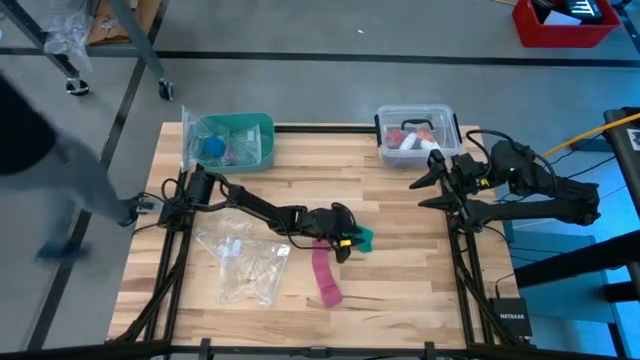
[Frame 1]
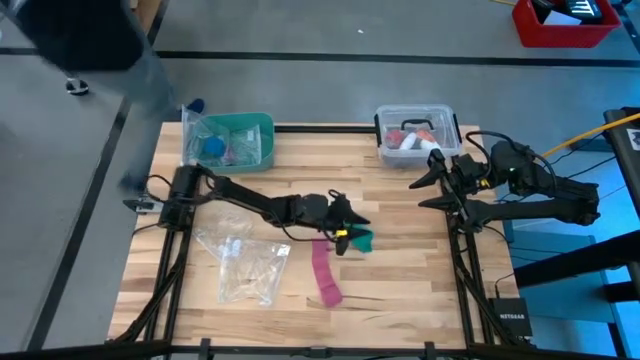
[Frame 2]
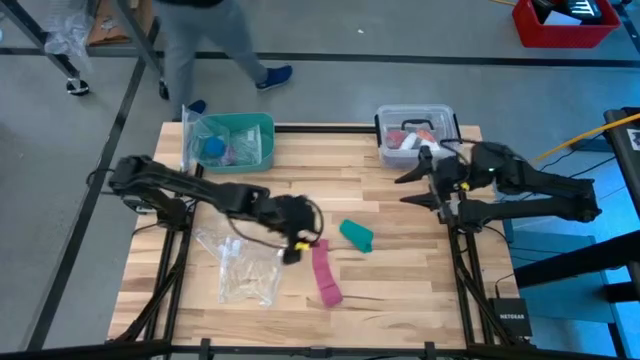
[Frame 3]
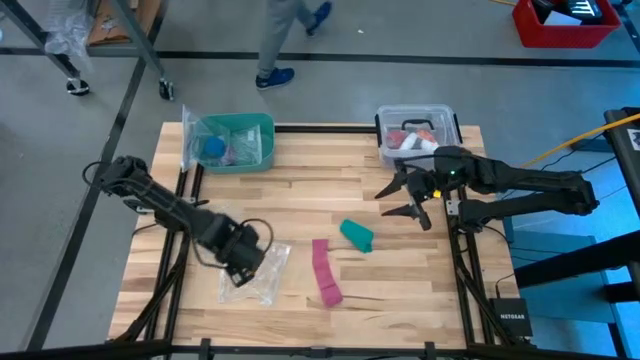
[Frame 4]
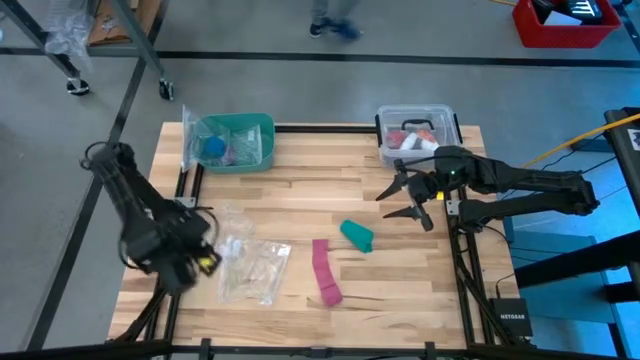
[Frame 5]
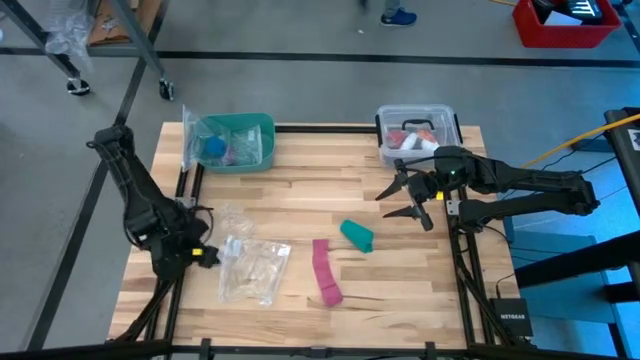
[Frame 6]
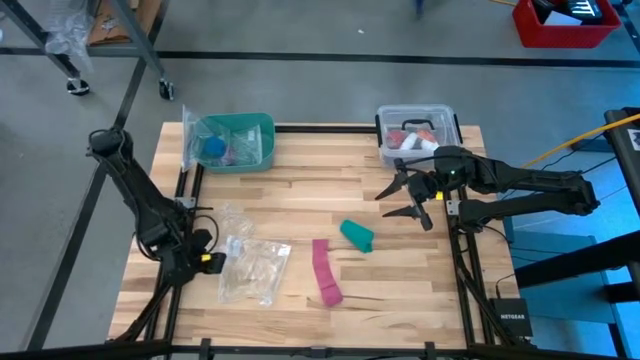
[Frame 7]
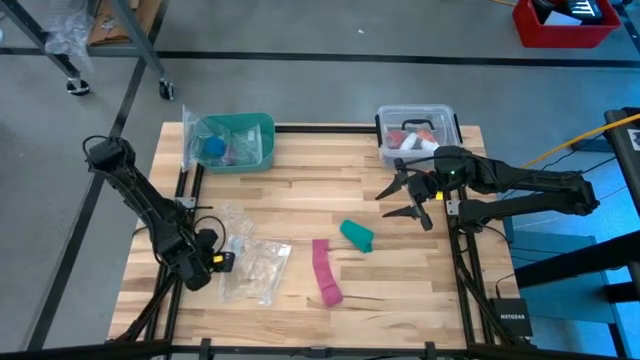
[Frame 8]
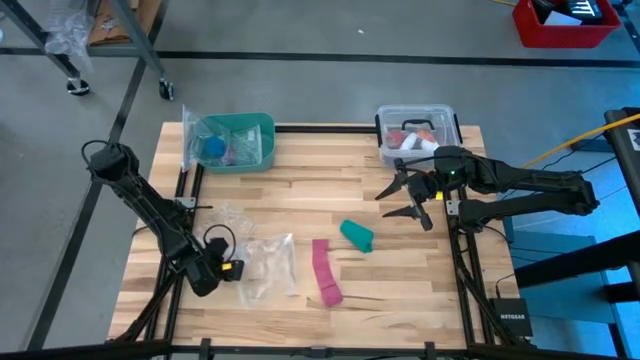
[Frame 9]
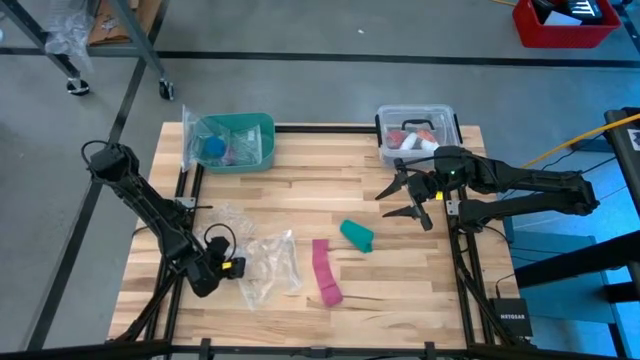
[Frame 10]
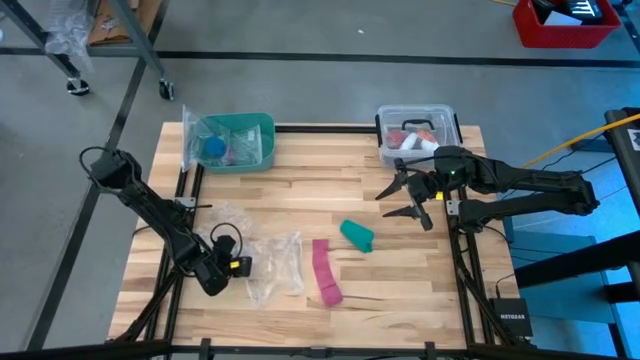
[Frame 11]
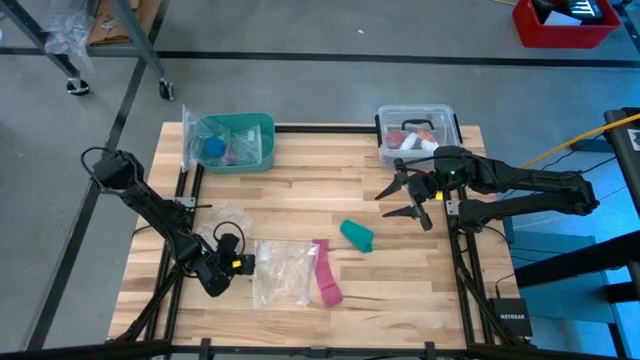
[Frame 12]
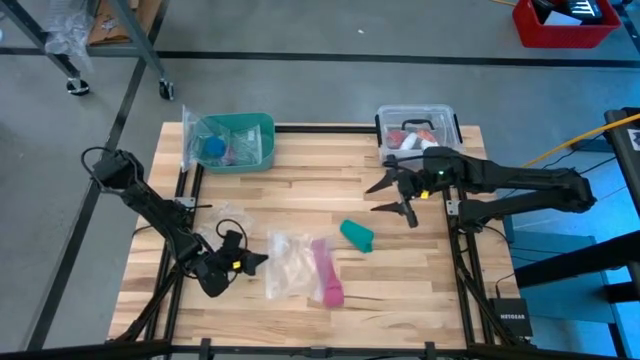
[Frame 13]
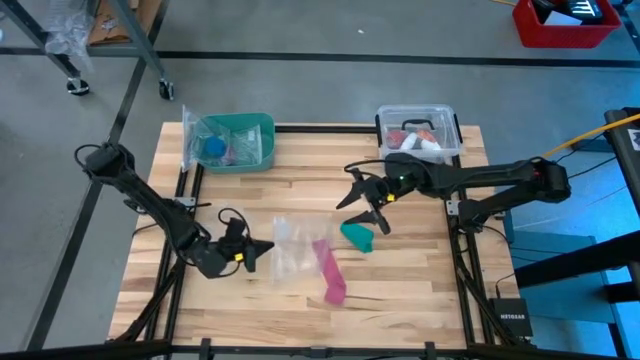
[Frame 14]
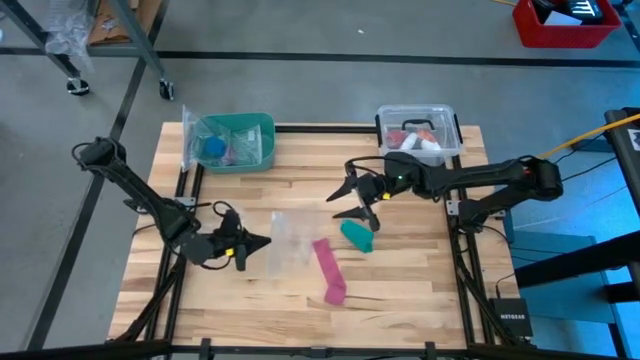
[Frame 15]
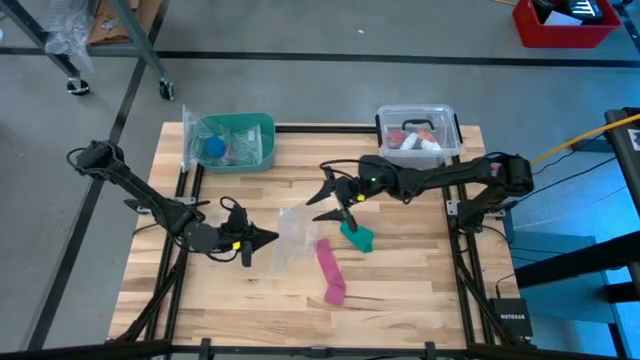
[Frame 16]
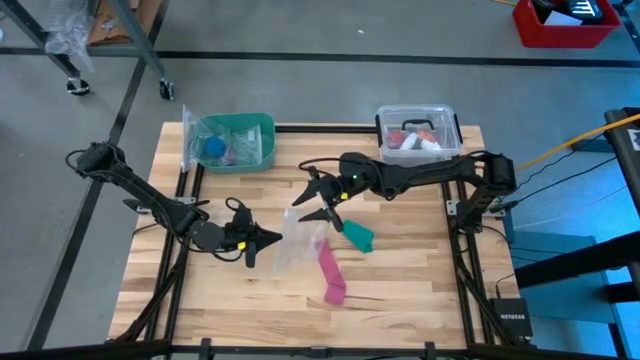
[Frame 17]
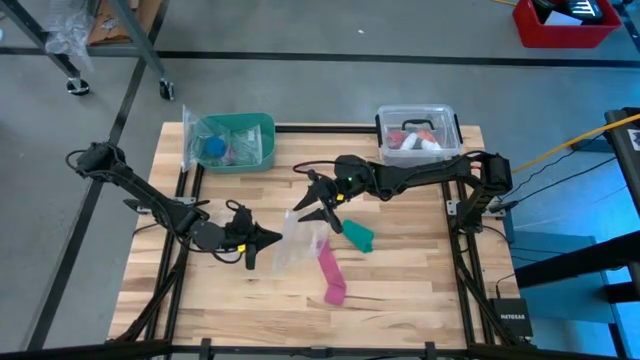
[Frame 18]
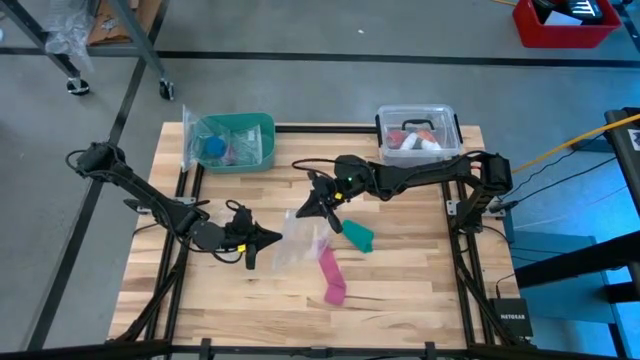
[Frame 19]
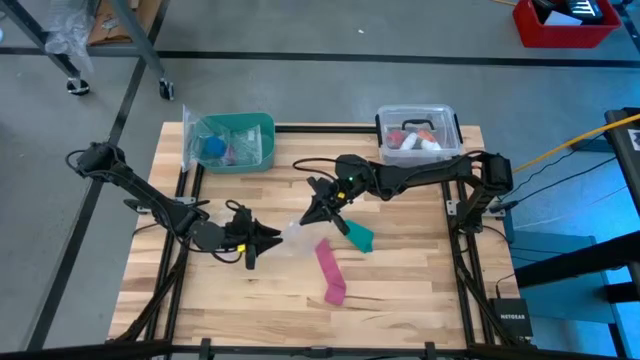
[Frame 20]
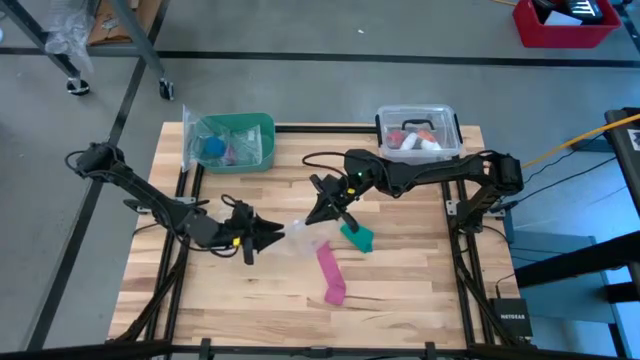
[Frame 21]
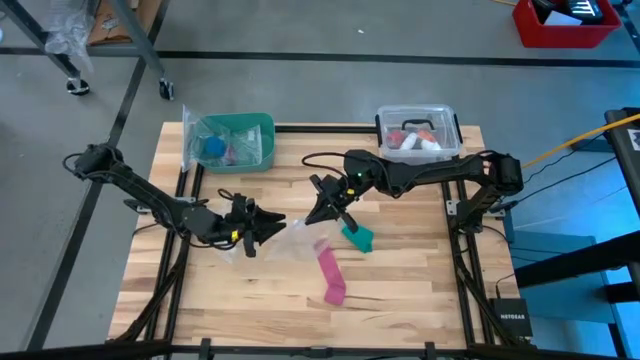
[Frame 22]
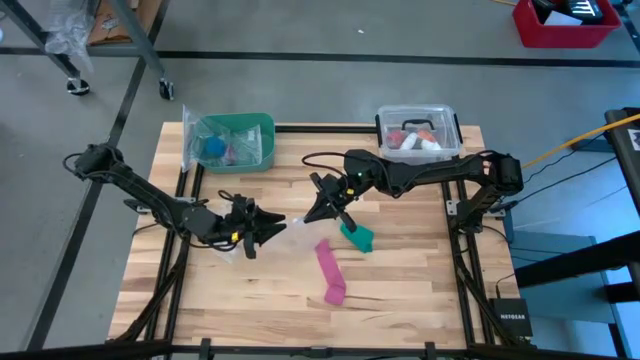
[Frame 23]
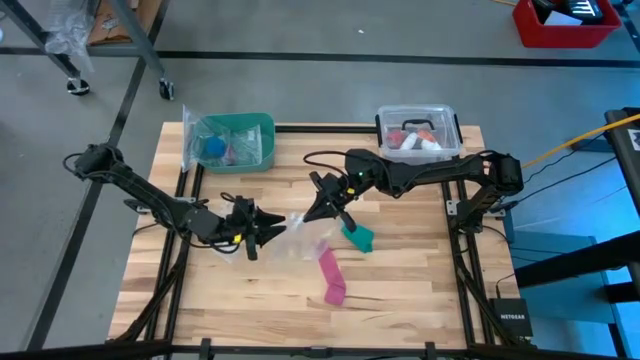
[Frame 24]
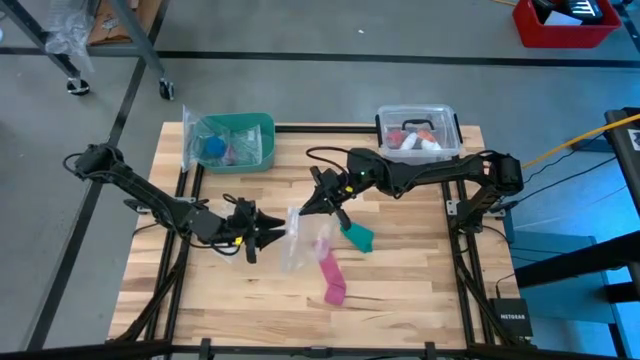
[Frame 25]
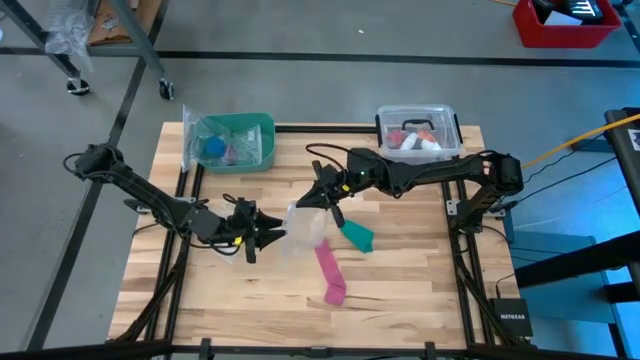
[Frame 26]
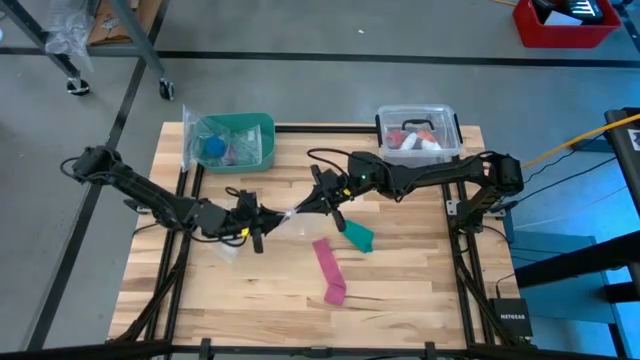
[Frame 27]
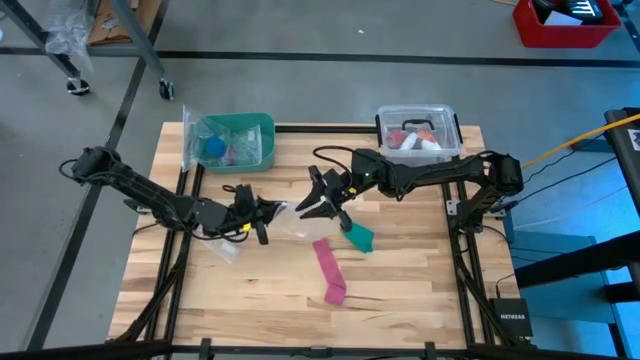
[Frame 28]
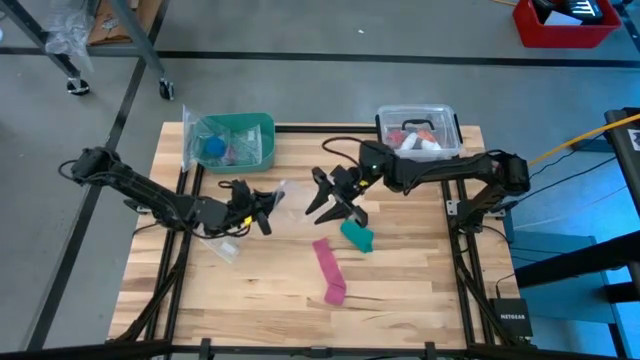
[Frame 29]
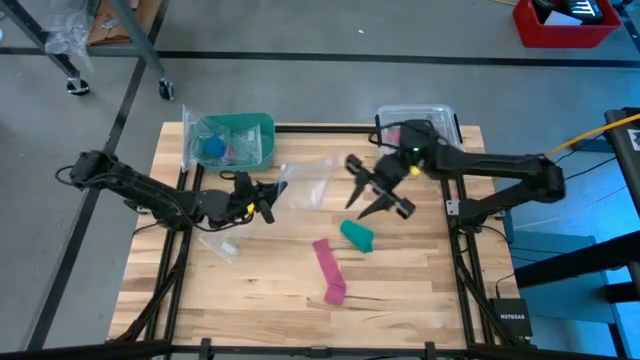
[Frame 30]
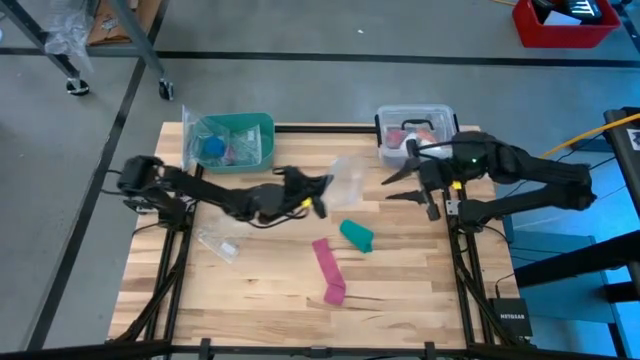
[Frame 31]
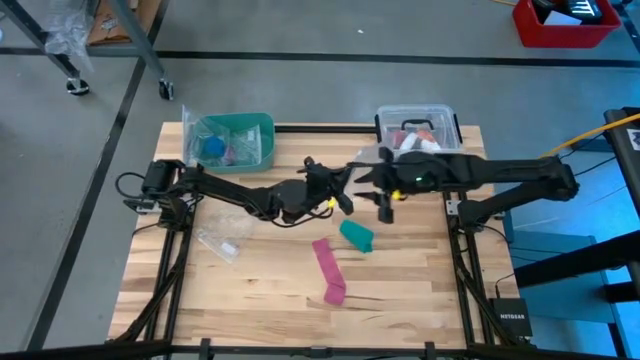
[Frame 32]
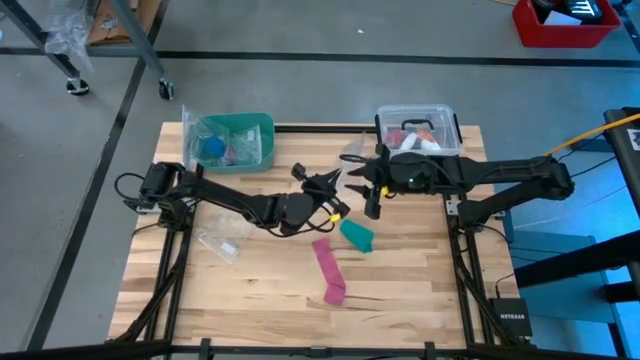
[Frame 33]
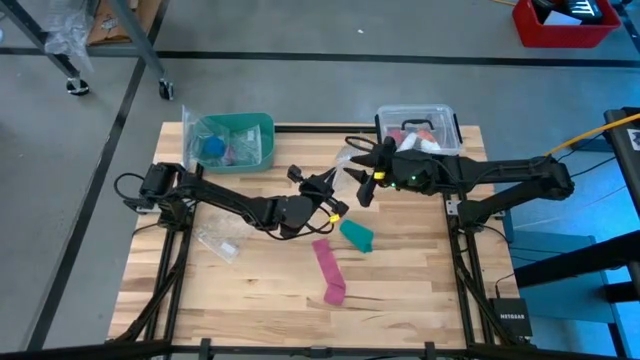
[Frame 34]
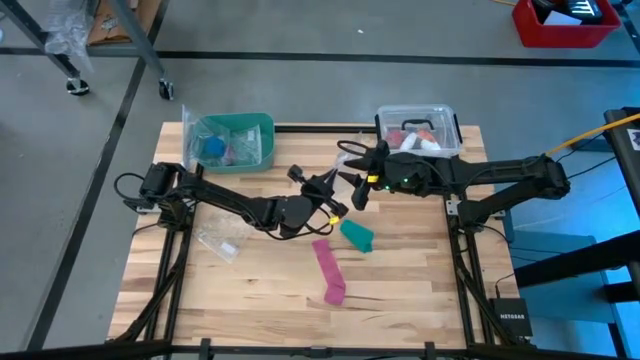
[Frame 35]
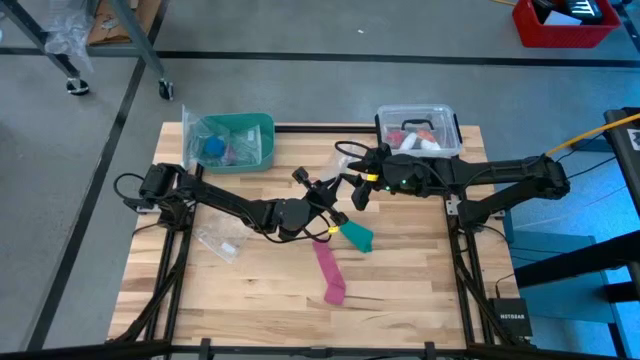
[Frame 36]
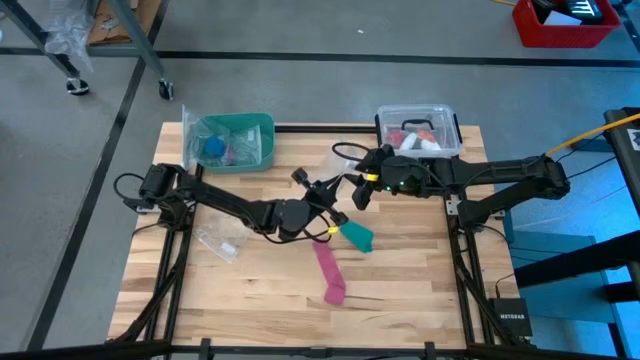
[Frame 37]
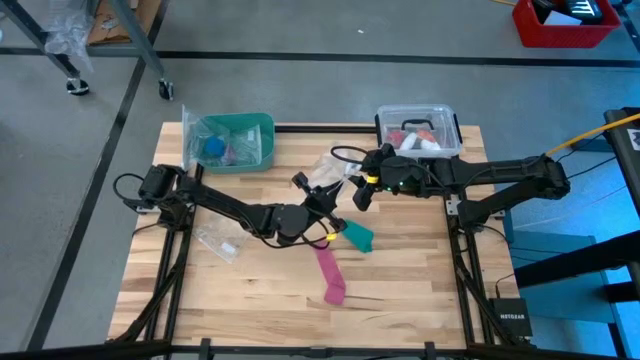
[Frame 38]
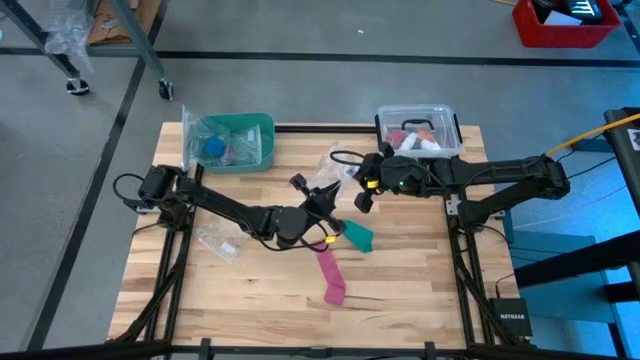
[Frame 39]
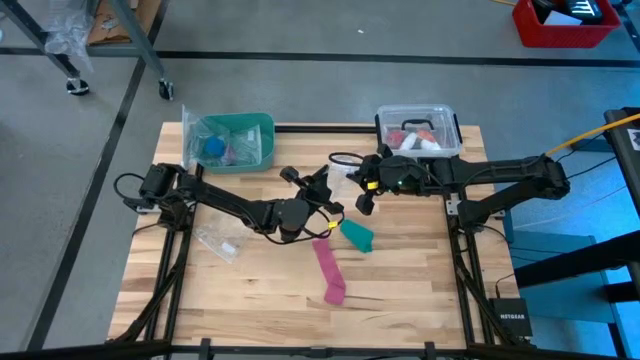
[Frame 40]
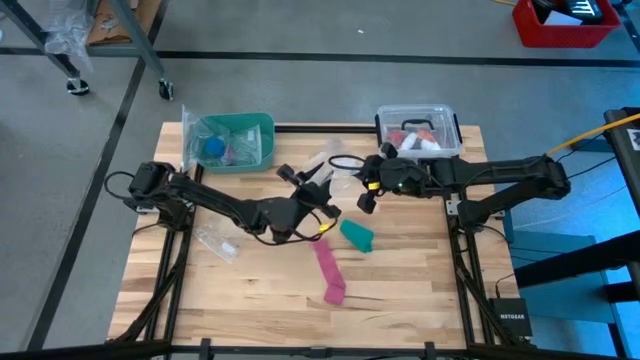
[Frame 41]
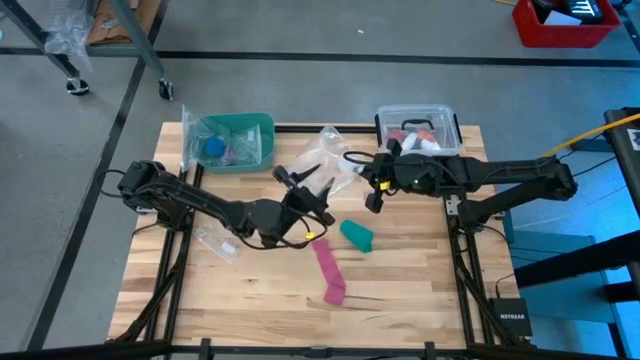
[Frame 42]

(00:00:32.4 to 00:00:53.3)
Task: Roll bandage
Open the transparent zip bag
